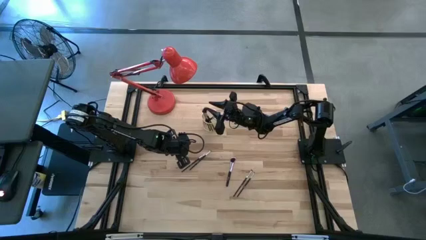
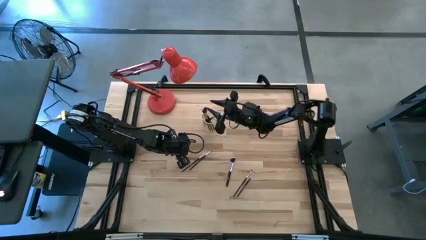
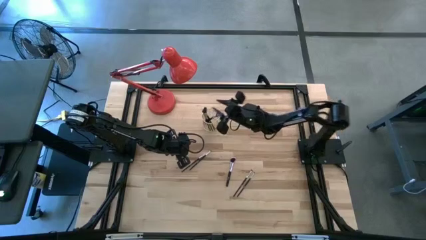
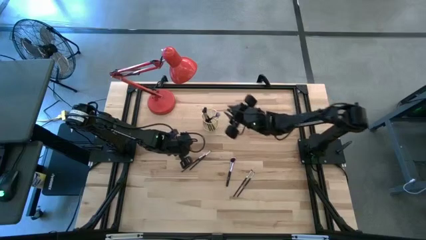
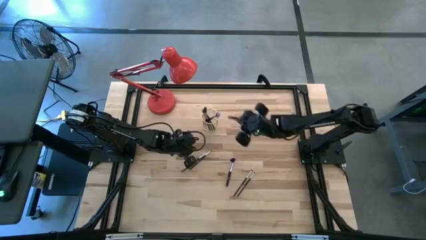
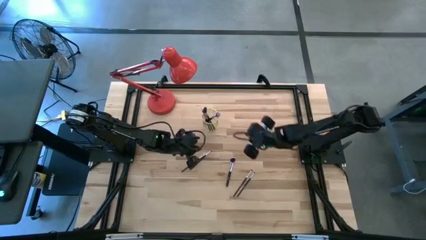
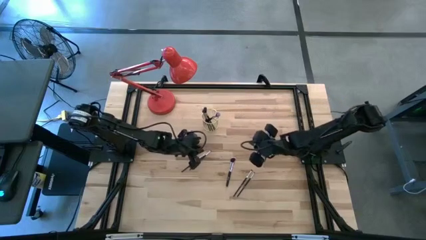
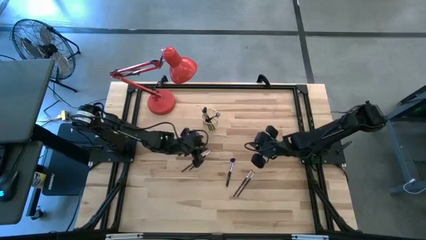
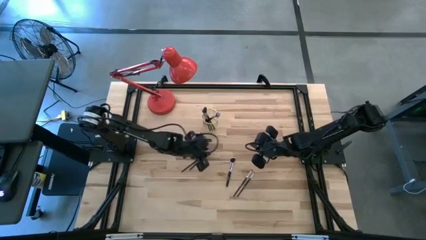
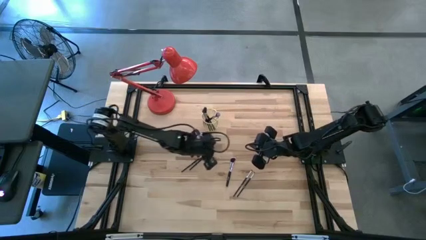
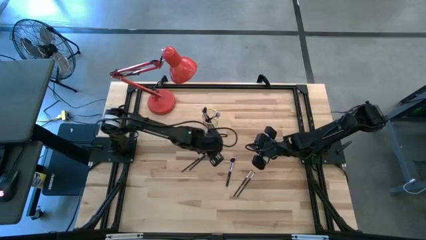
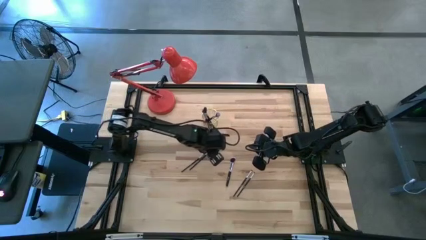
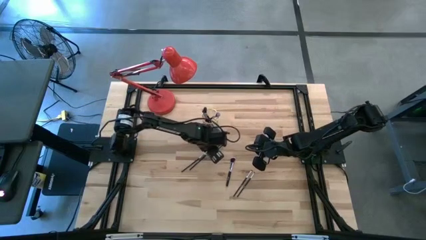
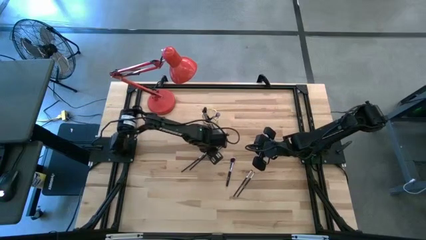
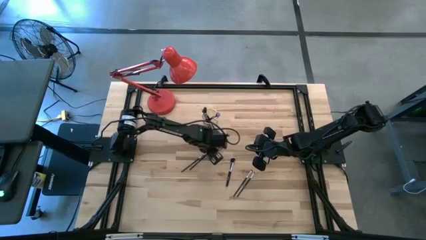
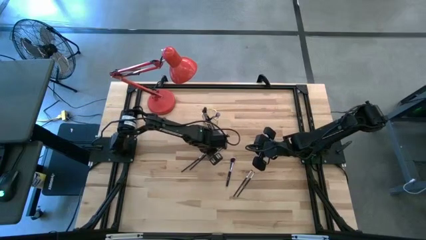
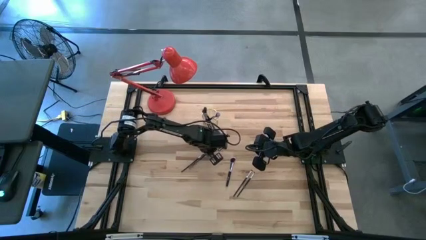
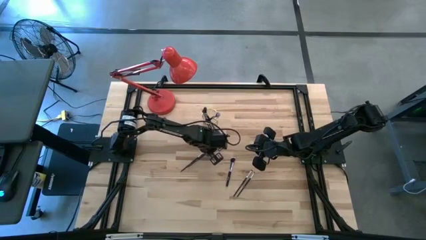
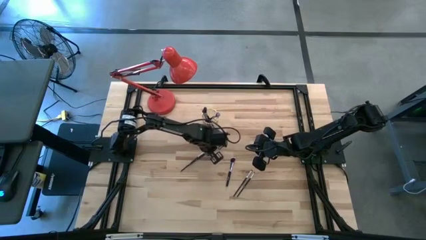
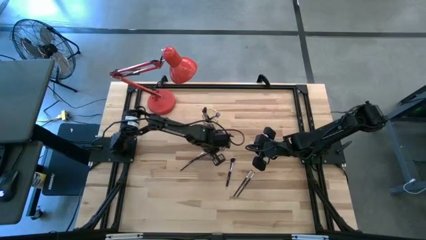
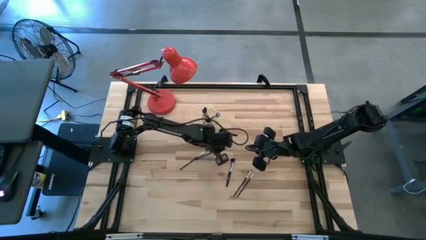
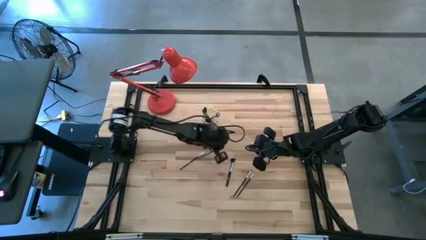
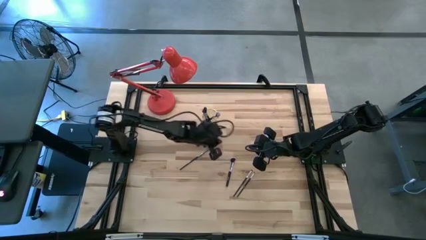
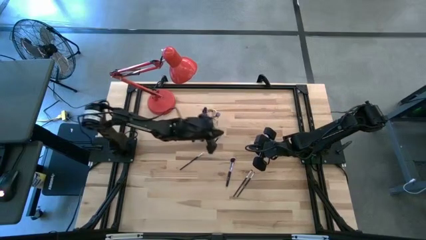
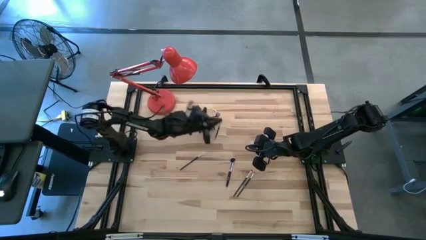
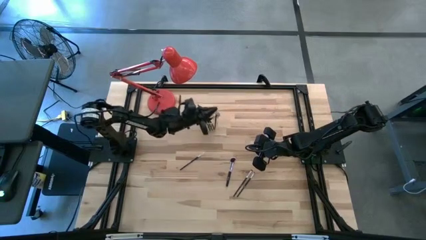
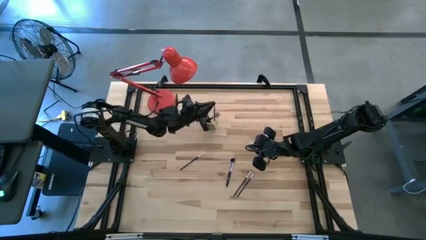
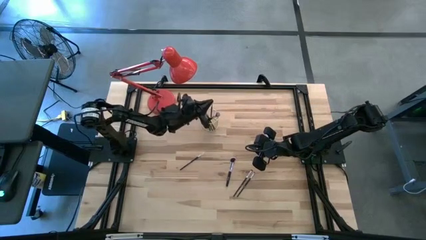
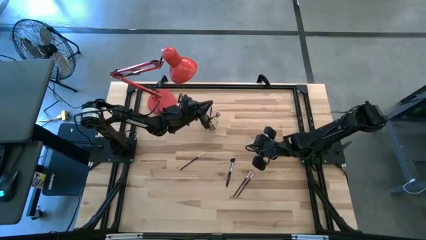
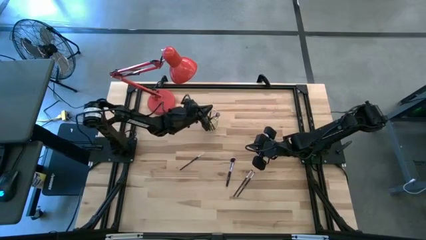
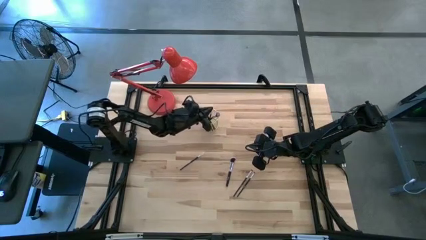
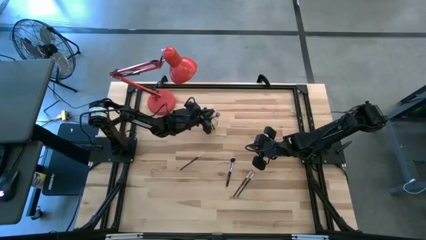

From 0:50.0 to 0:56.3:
Task: Put items in baskets/containers
Put the black eyeshadow brush into the gold pen holder

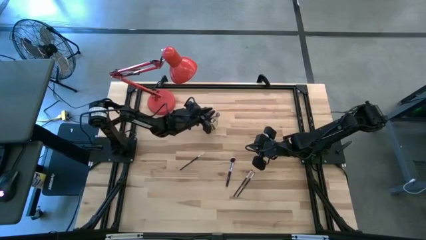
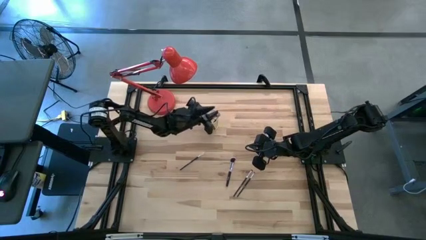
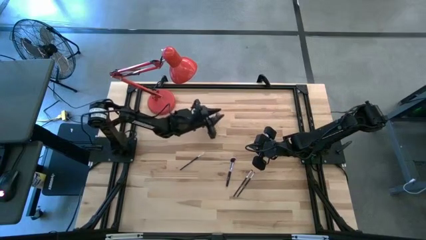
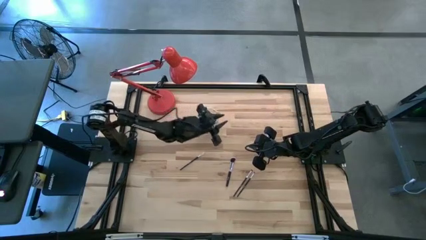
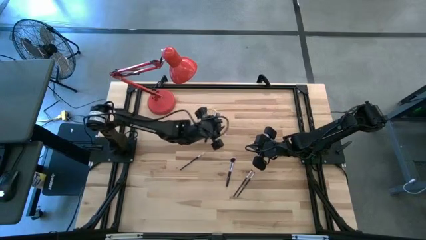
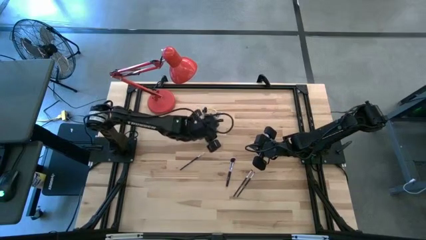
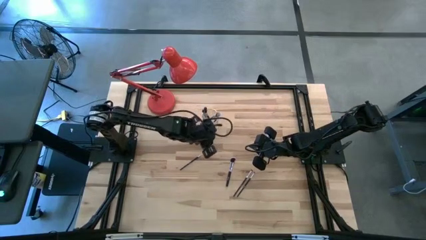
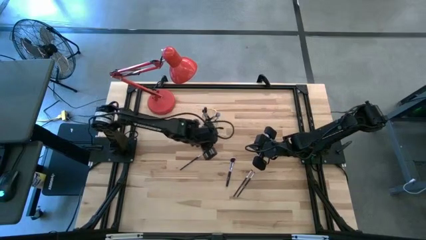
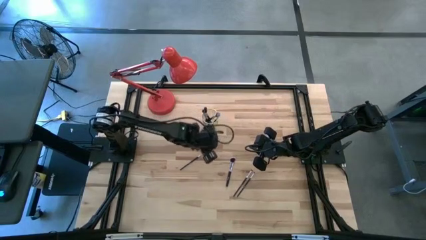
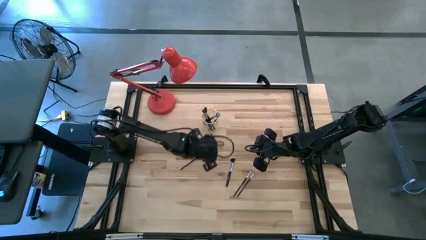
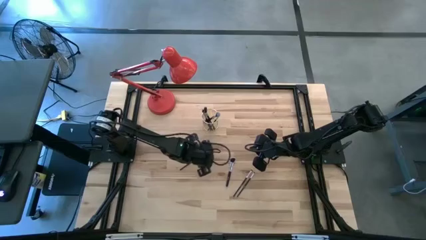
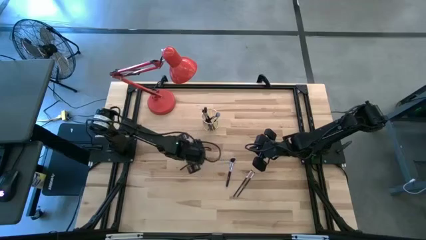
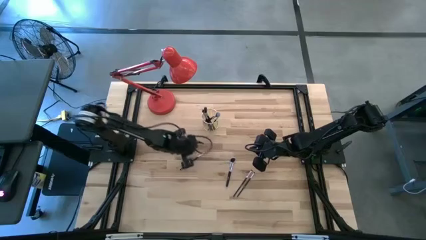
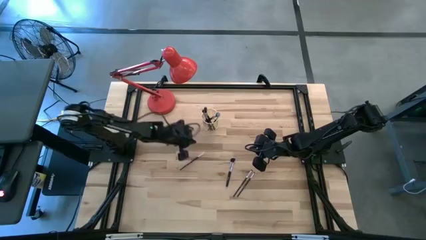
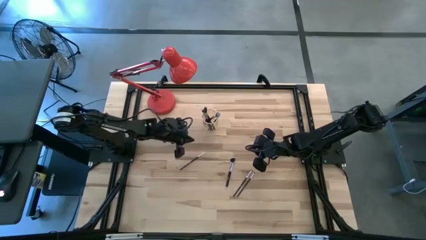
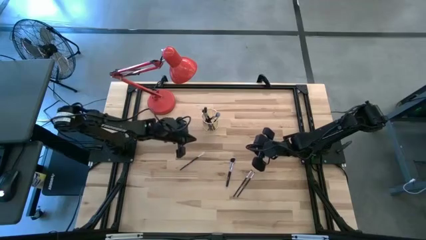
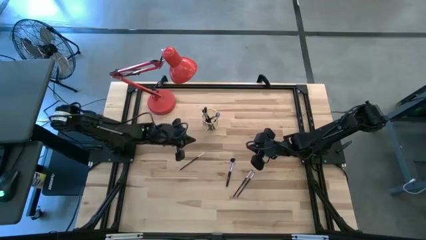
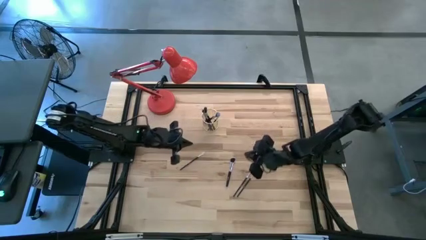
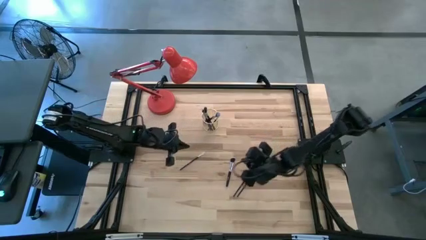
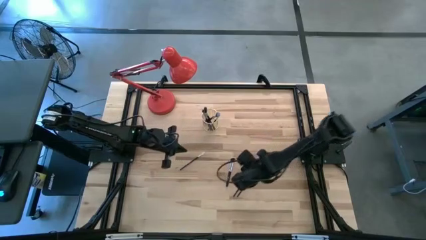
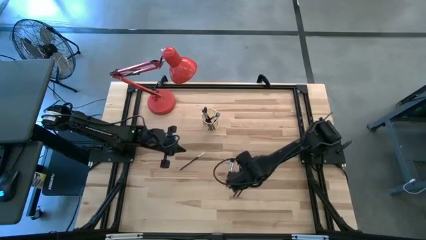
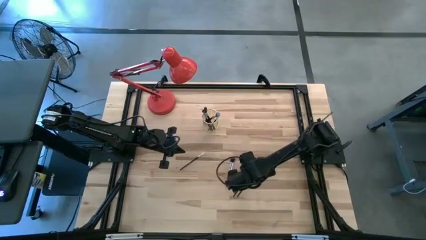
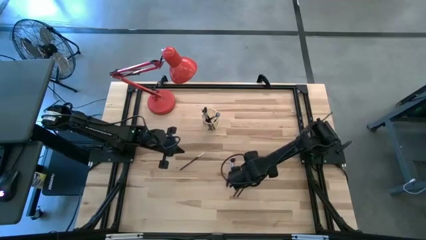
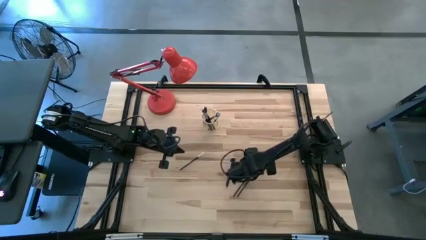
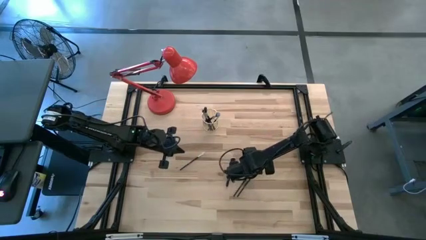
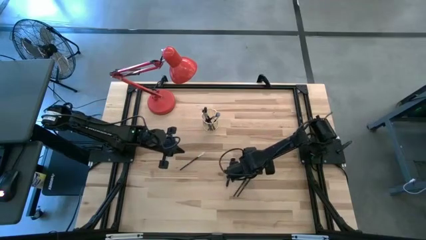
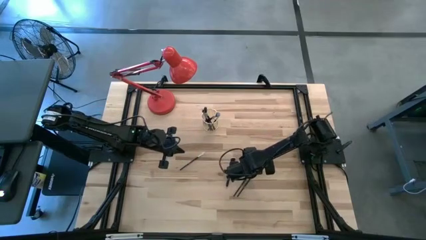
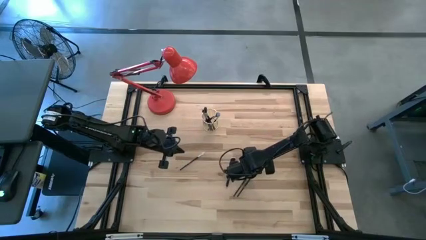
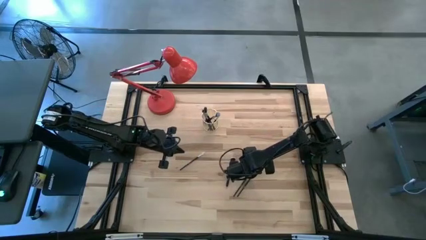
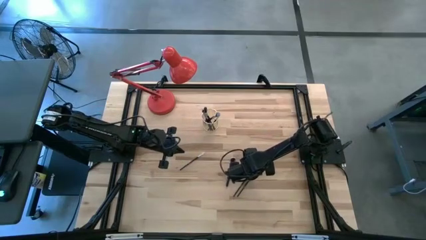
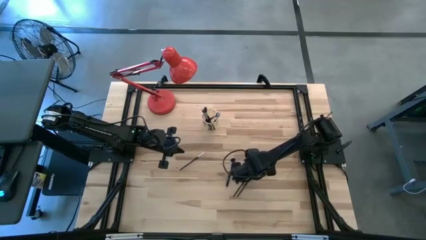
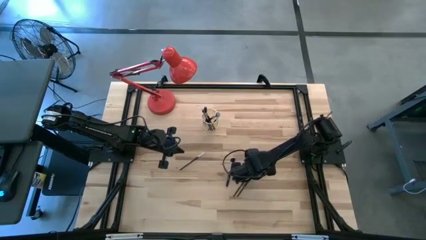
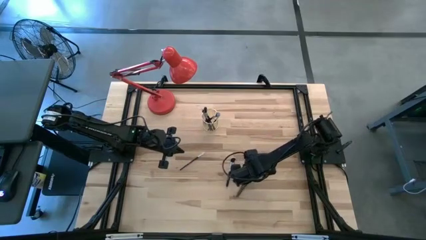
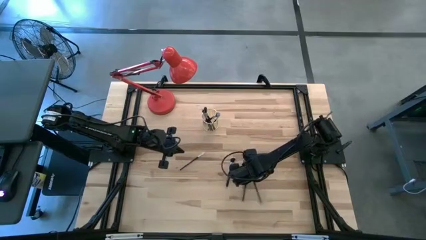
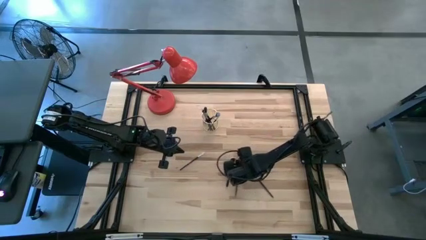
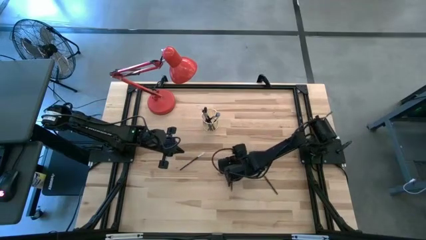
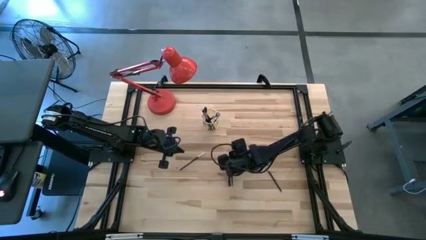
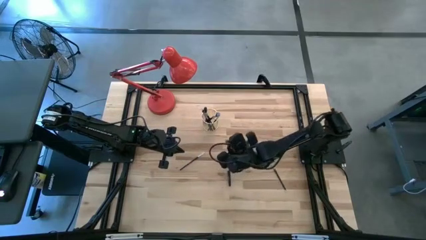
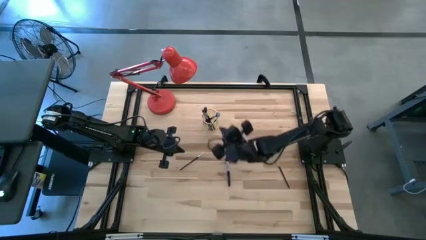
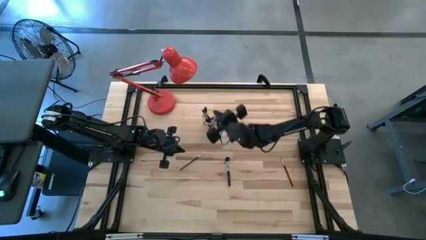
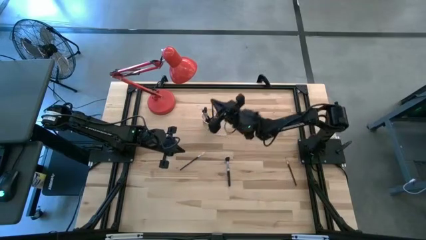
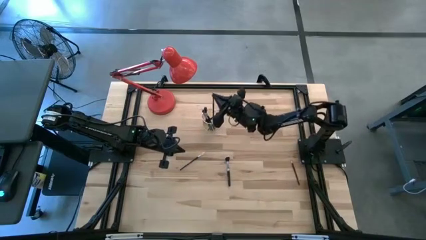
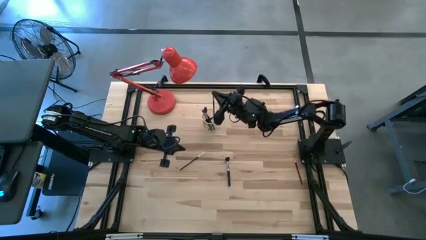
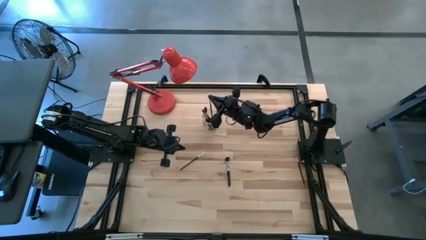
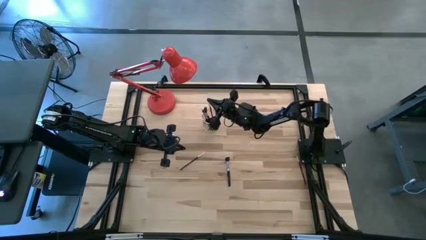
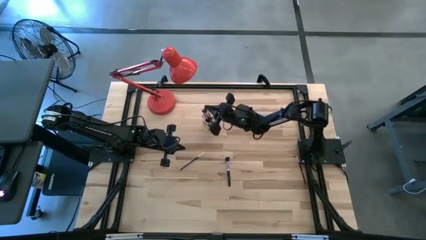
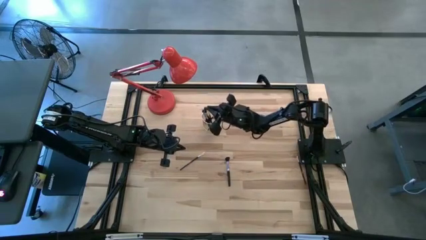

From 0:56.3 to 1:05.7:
Put the black eyeshadow brush into the gold pen holder
